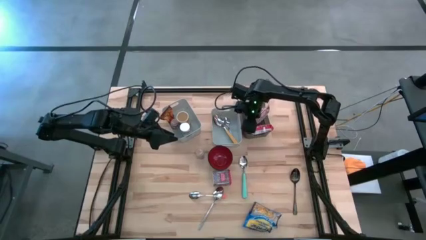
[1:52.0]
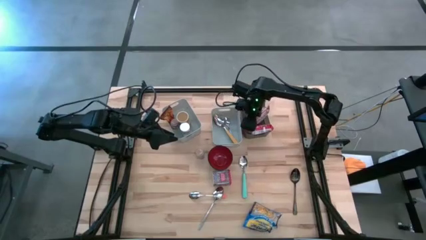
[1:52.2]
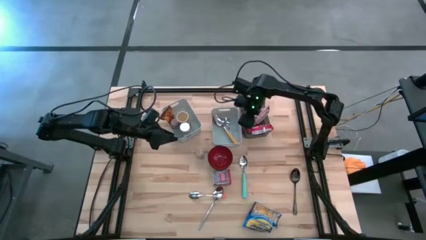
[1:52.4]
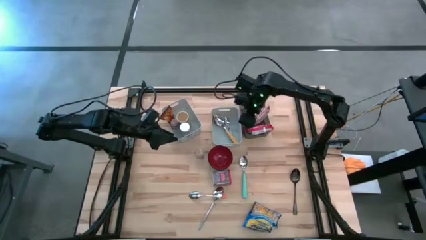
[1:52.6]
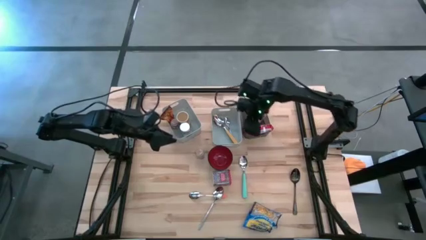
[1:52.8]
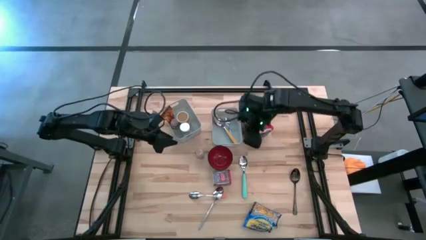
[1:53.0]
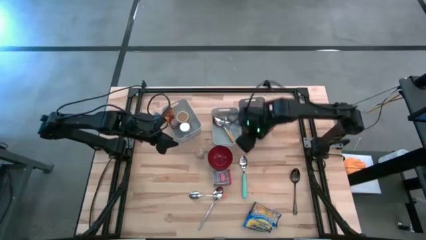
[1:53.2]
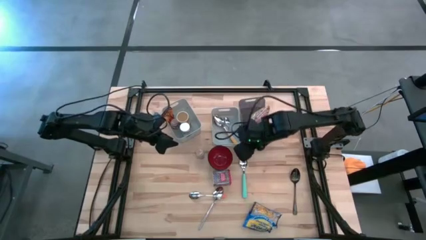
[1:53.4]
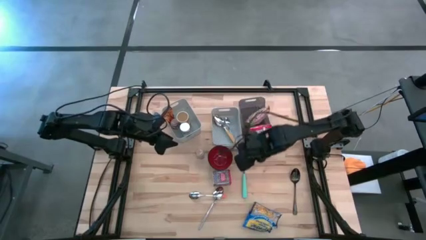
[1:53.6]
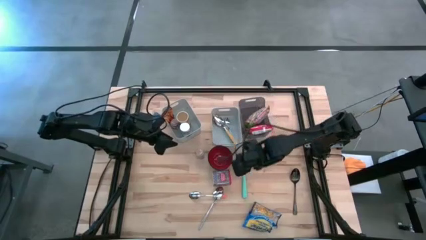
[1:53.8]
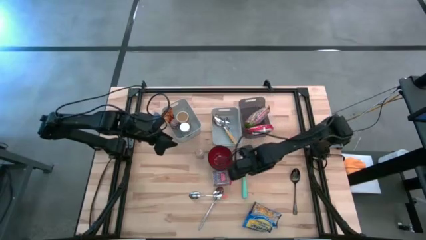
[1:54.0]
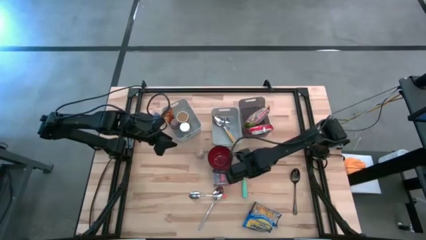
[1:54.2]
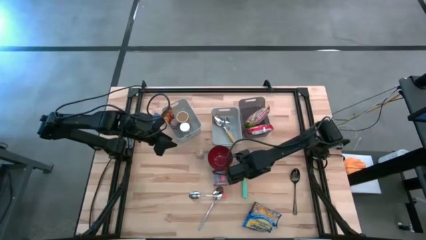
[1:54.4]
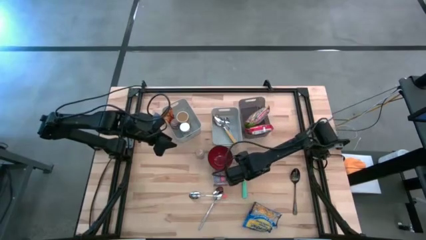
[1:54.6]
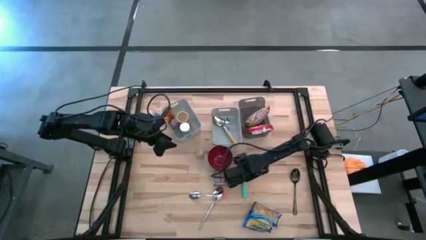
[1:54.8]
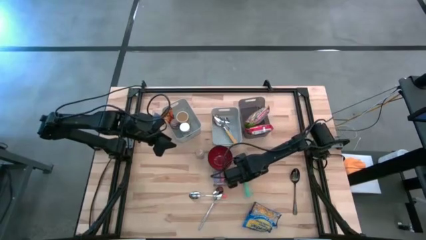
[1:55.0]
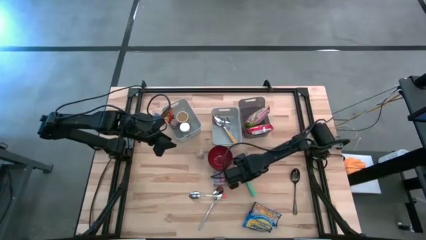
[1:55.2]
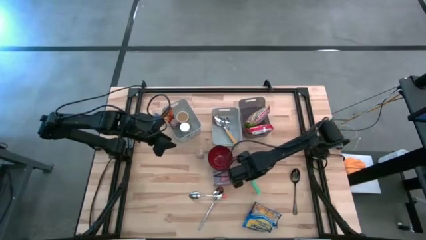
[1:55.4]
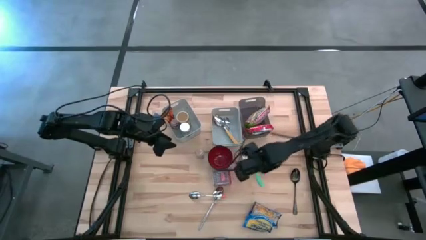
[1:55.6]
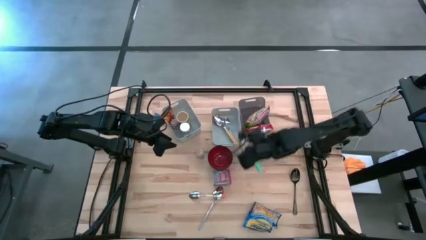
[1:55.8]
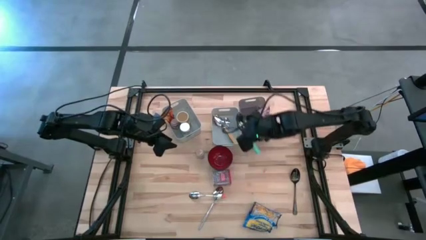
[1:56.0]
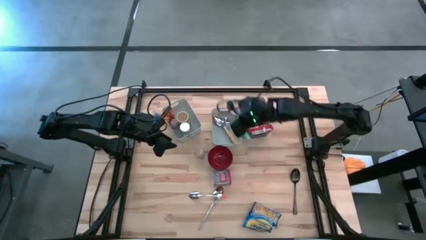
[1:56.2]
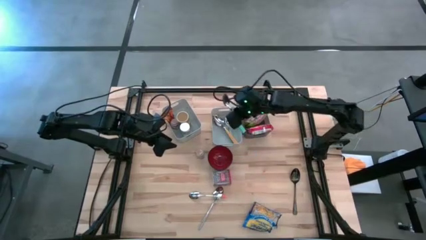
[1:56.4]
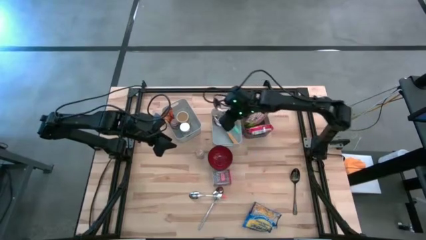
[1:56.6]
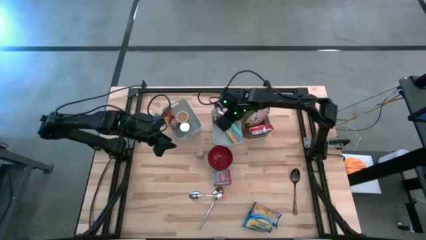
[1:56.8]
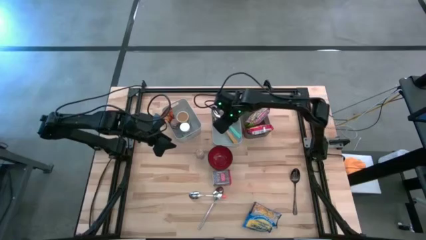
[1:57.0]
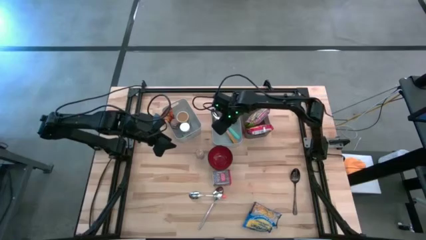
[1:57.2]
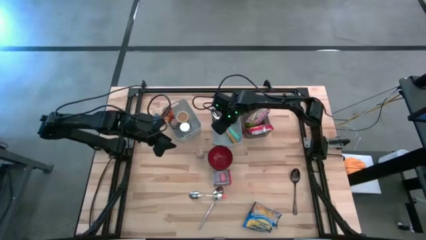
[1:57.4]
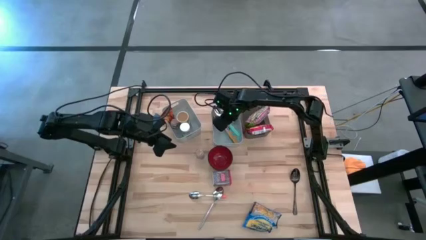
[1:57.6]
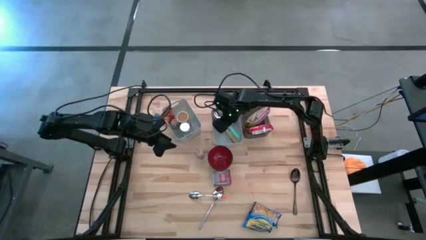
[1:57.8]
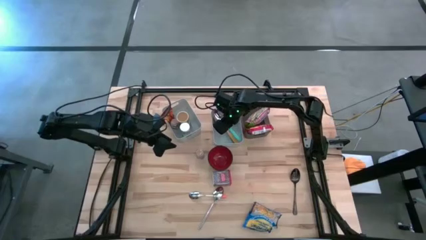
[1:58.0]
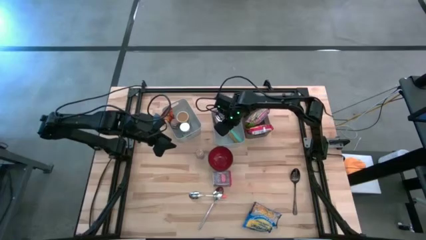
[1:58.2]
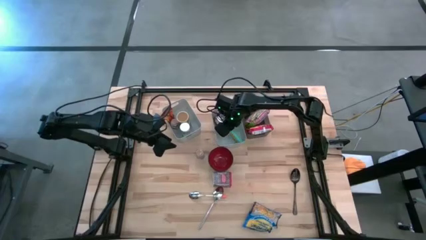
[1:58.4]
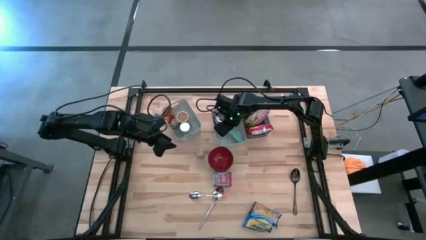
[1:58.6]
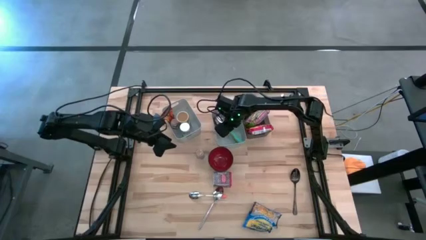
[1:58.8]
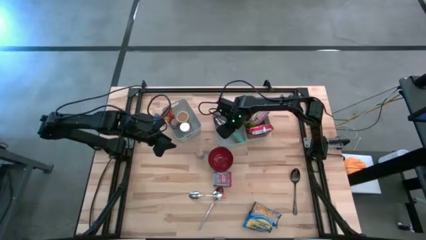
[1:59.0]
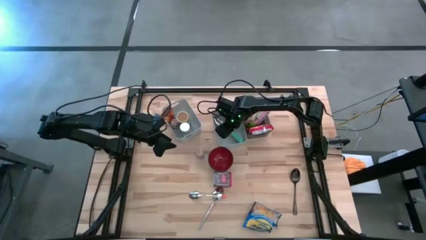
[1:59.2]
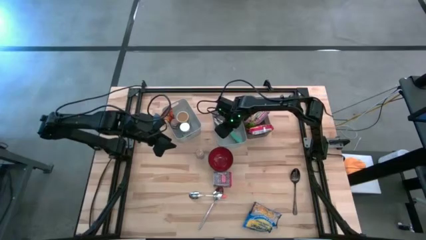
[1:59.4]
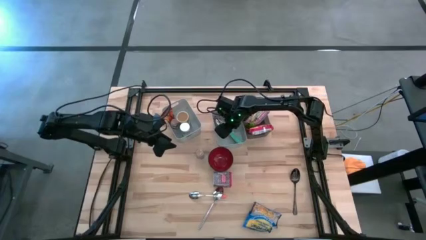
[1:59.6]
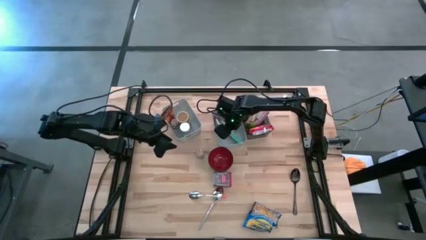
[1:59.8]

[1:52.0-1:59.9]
Put the light blue spoon into the right white bin

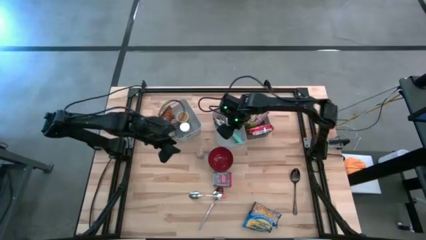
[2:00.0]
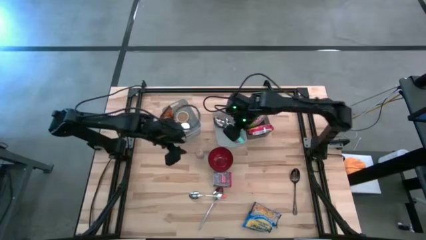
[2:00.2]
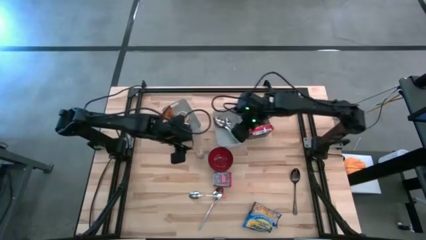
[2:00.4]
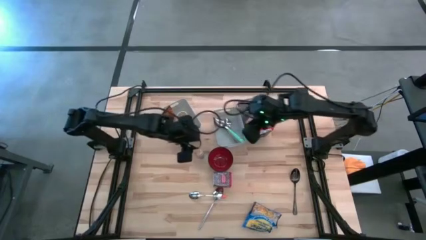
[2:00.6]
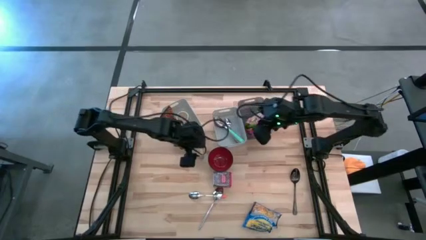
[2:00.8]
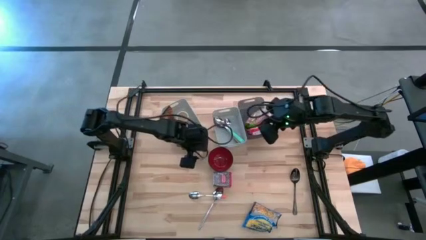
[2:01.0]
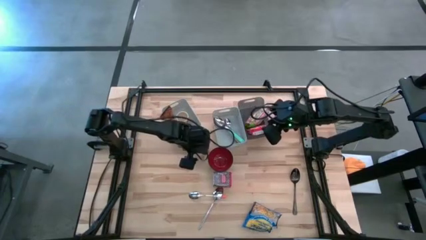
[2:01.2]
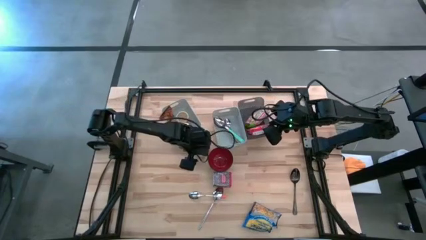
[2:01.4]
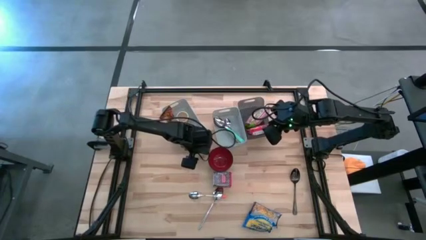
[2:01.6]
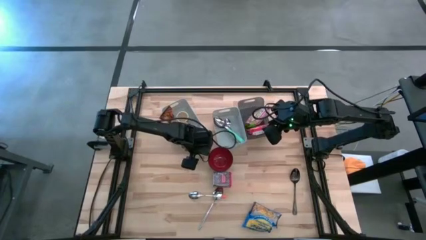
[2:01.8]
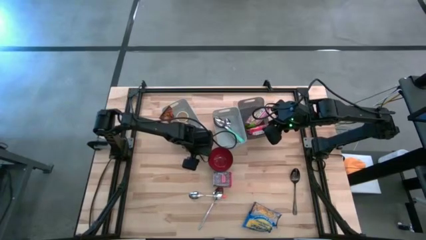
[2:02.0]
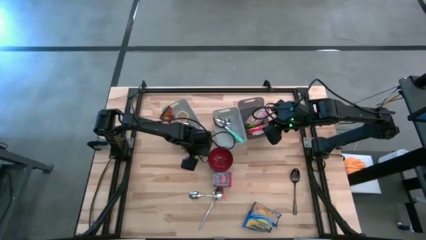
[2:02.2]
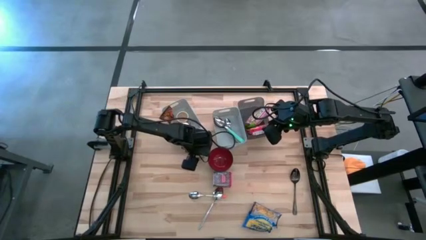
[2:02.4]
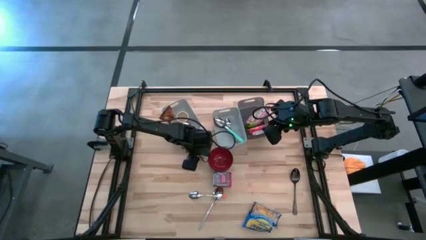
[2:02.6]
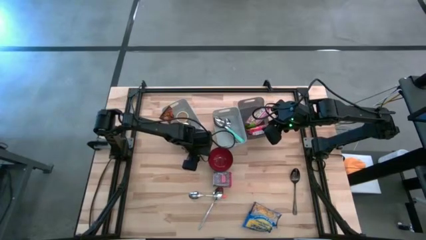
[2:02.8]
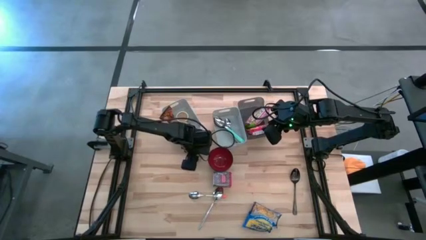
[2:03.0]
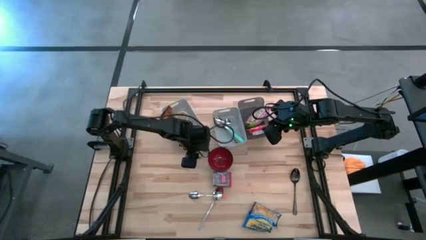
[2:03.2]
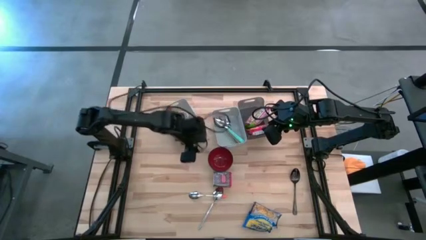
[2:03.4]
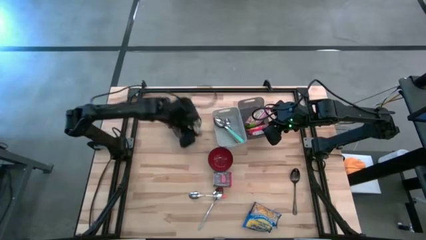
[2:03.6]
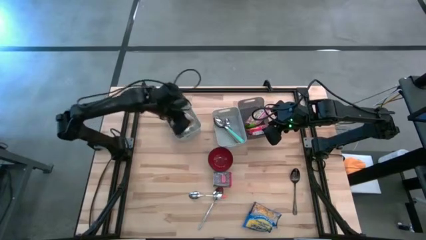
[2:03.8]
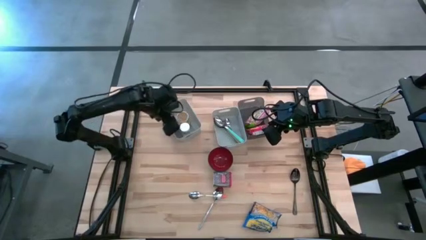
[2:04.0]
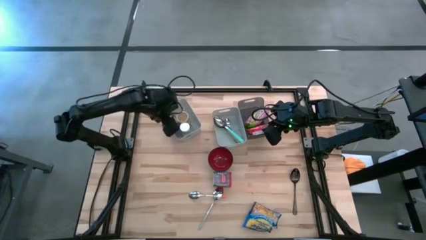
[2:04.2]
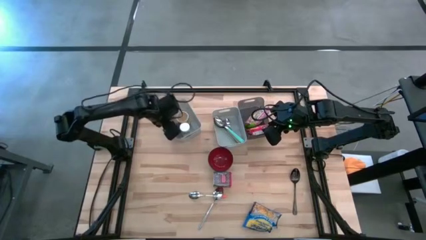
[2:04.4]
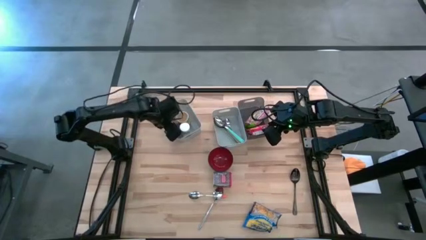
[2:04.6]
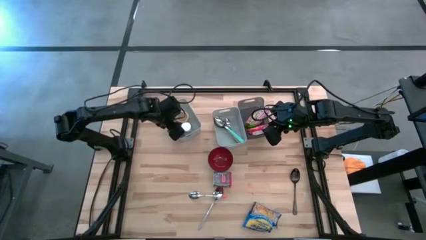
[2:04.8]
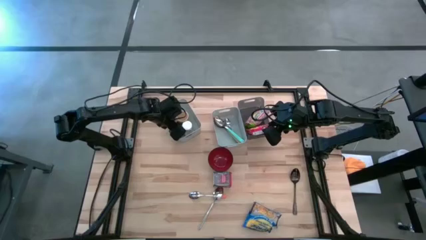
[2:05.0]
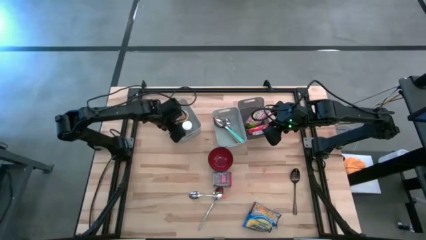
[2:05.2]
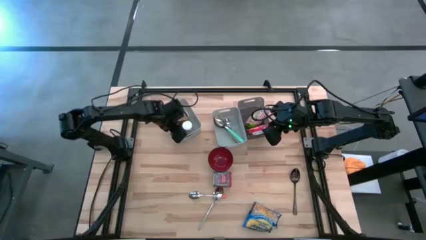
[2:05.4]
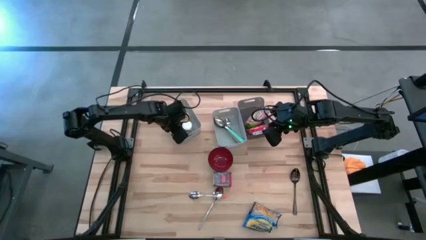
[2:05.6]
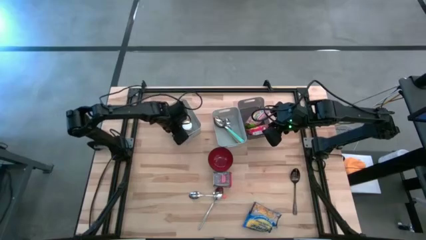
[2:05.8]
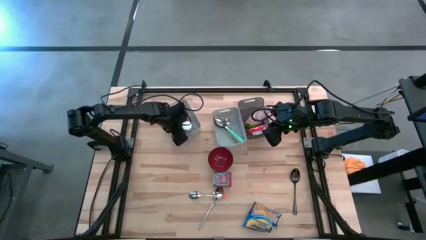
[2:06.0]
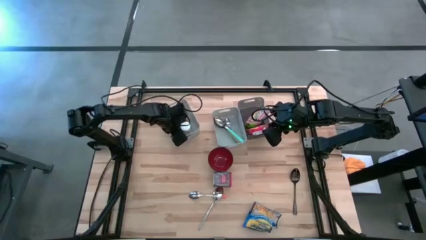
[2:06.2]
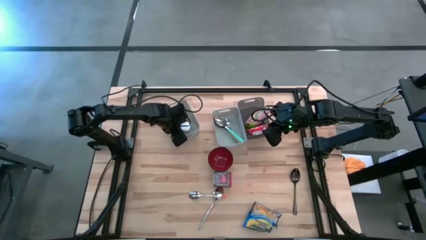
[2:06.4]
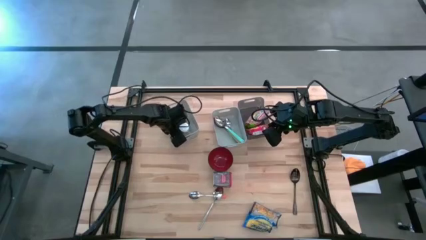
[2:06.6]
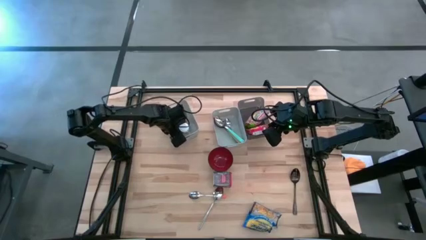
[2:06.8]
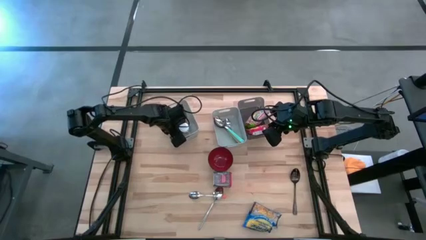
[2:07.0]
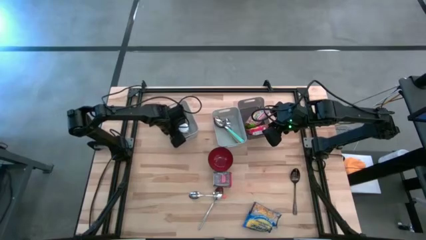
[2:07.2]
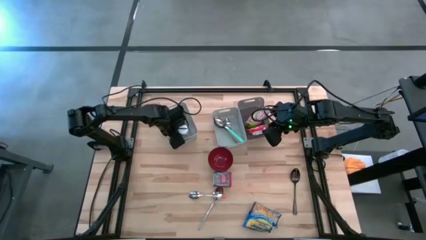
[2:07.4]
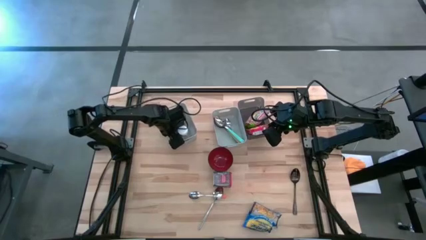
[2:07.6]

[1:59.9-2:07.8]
Put the brown seasoning bottle into the left white bin
